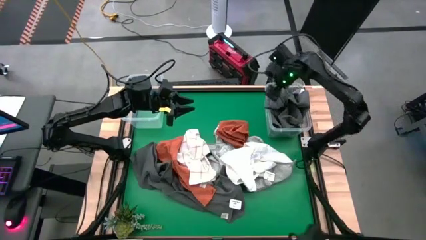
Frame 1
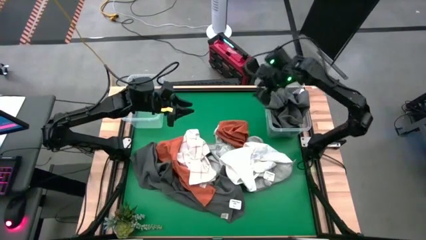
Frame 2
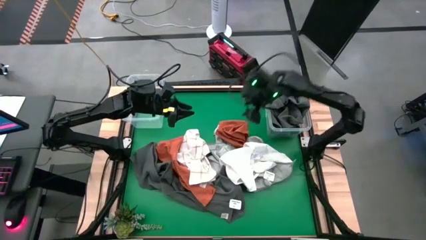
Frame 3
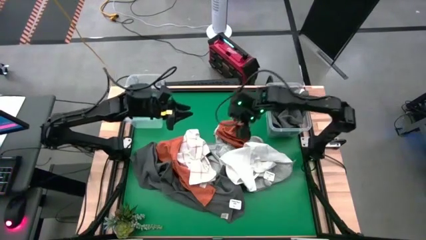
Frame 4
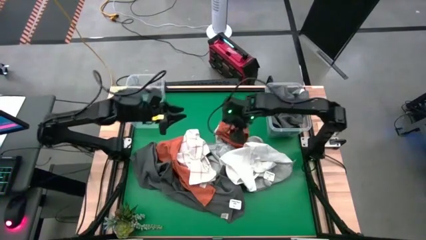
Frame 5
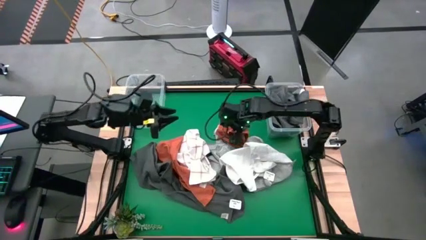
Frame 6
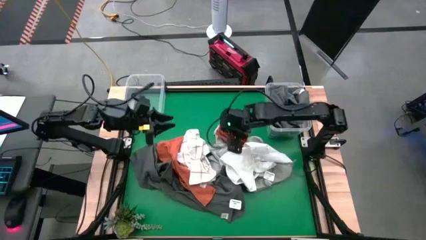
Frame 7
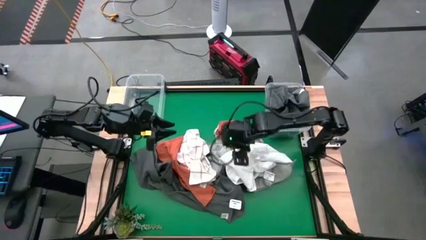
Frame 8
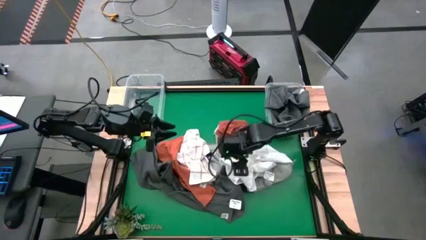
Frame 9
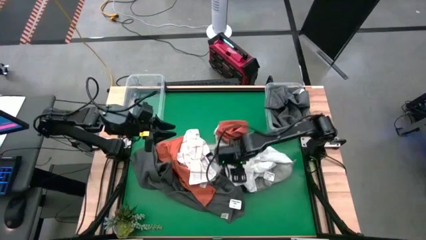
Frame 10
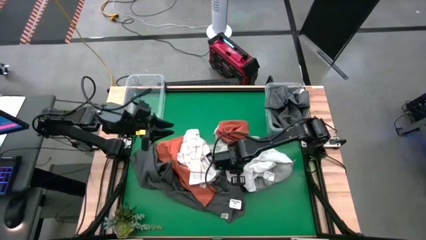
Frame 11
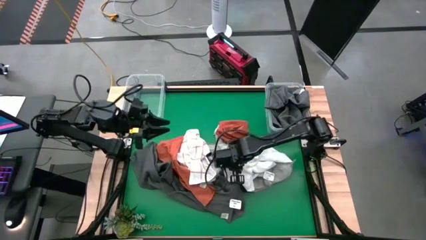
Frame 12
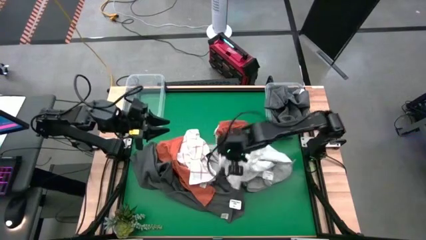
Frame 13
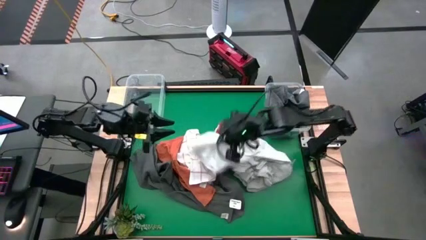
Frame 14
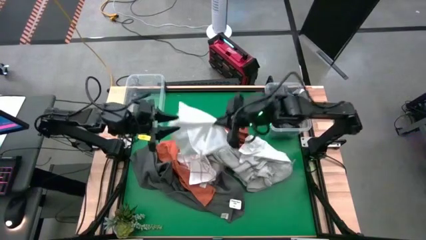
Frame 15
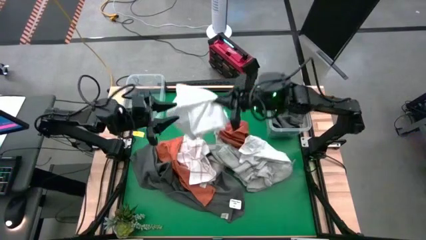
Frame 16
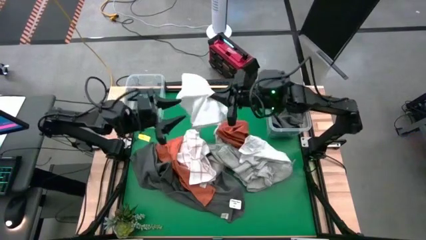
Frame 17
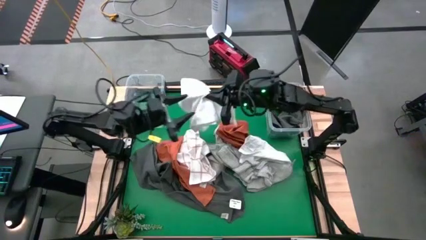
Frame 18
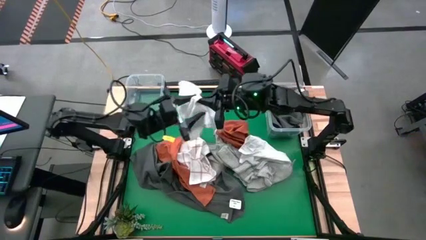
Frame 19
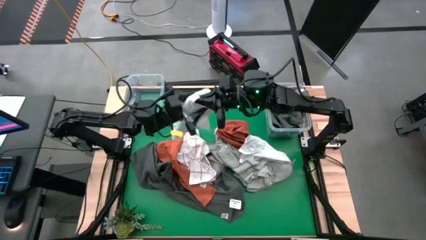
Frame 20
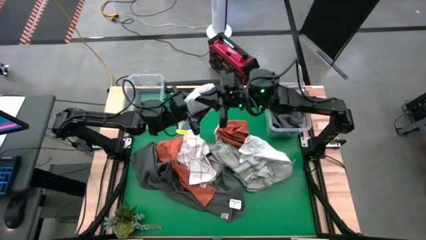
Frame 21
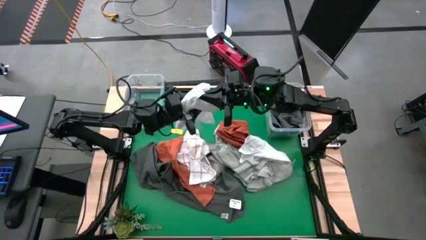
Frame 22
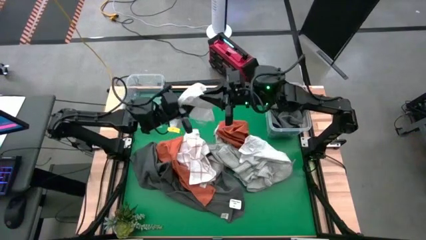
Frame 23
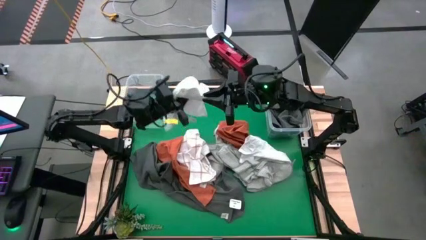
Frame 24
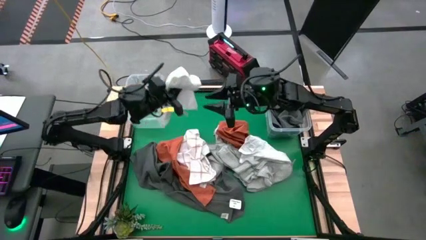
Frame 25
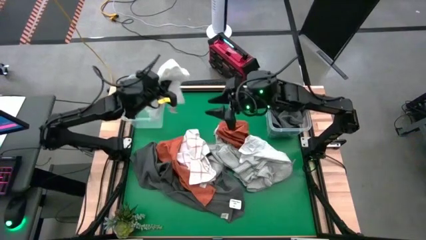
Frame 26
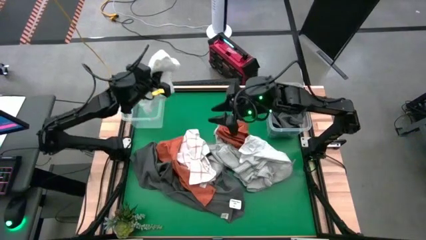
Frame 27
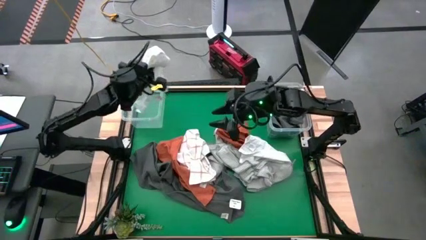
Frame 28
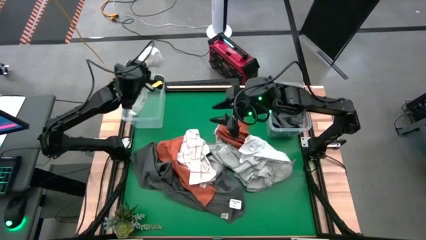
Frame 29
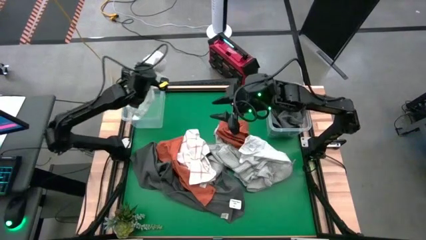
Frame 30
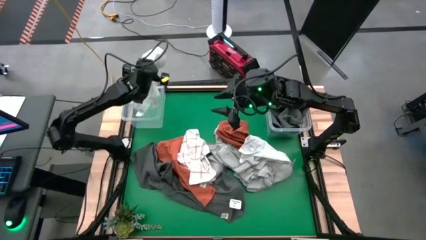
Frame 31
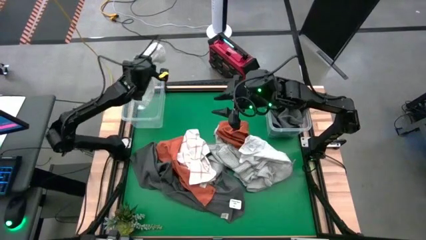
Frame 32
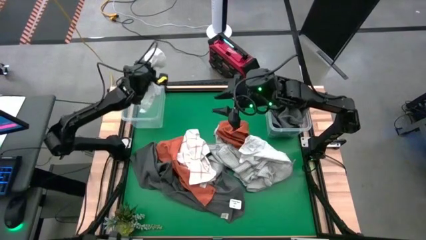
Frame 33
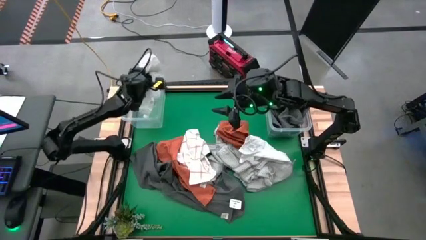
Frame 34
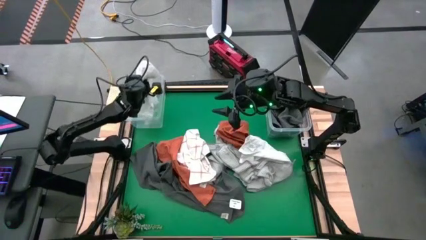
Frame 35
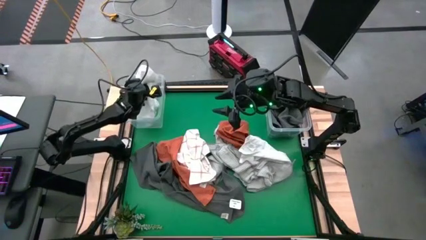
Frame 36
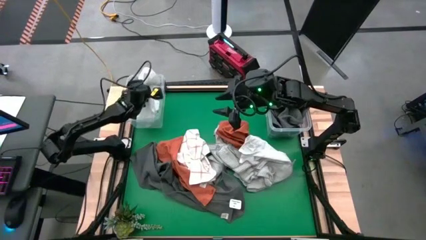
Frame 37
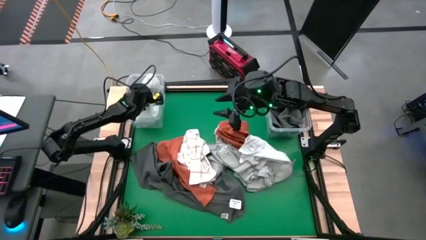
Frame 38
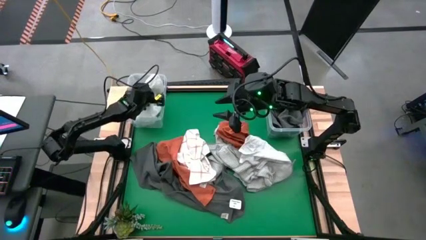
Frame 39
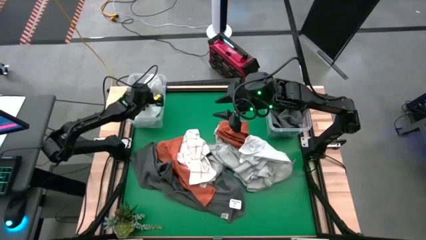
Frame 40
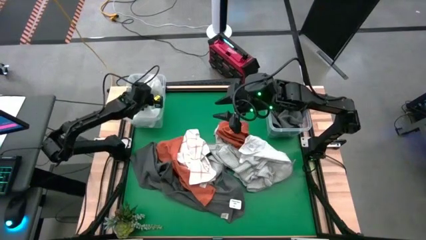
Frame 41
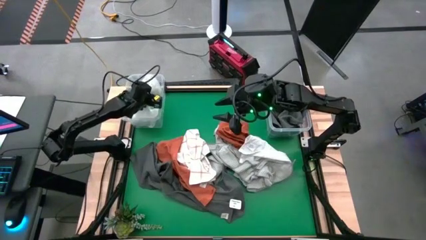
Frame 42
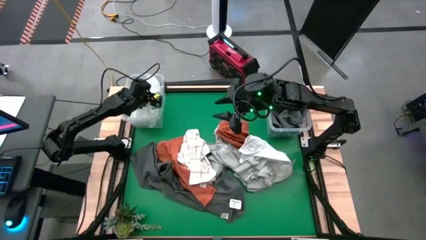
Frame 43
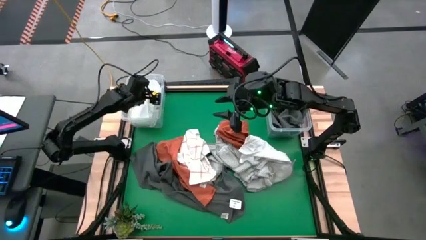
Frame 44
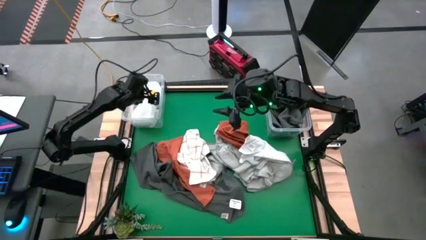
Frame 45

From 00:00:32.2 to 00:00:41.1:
Task: Sort towels by color in basket
Put the white towel into the left transparent bin

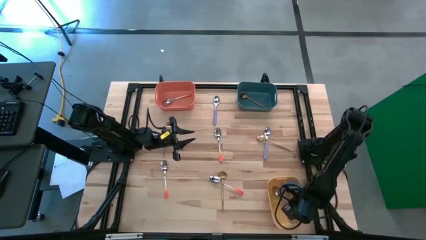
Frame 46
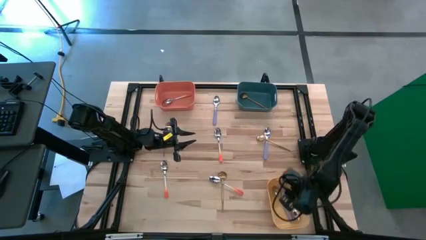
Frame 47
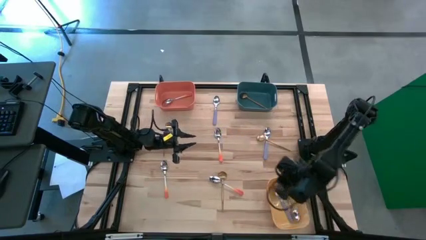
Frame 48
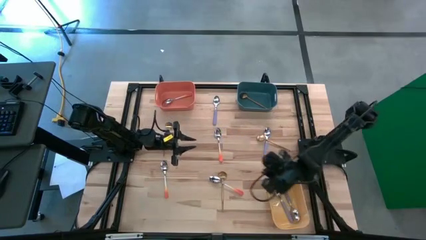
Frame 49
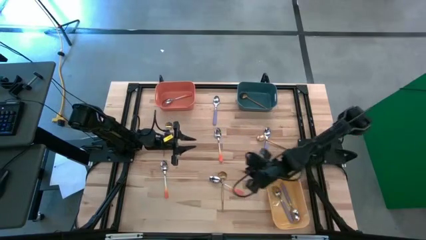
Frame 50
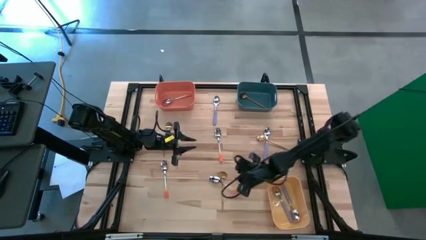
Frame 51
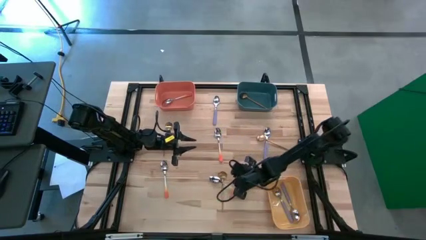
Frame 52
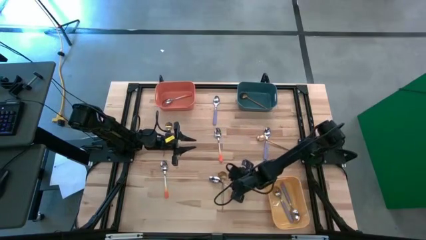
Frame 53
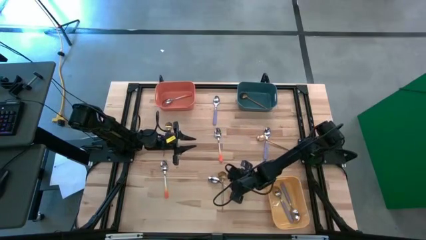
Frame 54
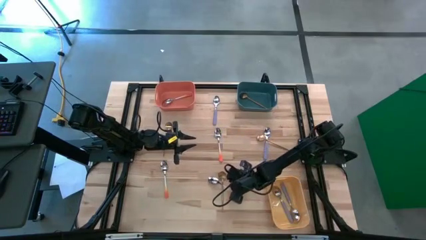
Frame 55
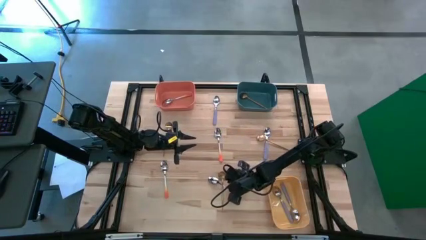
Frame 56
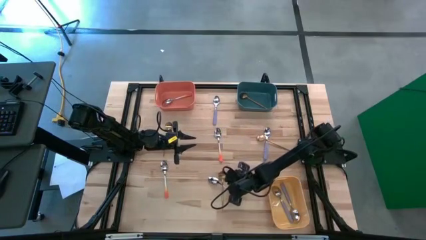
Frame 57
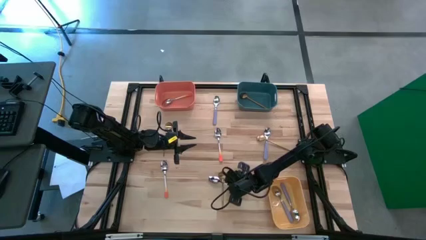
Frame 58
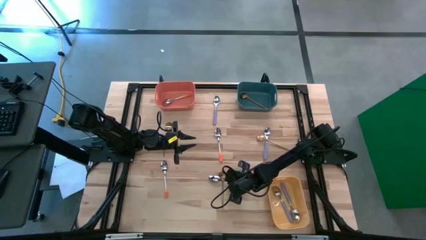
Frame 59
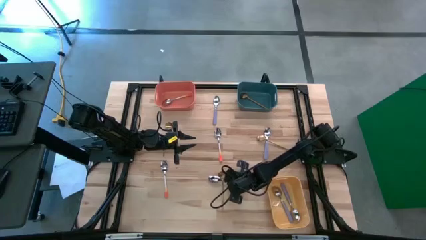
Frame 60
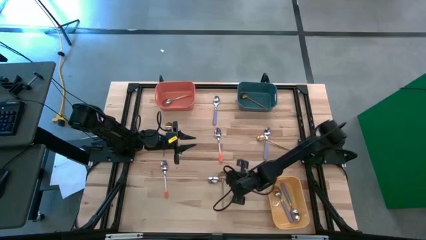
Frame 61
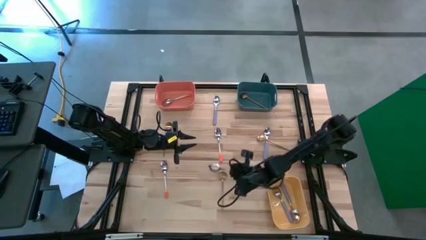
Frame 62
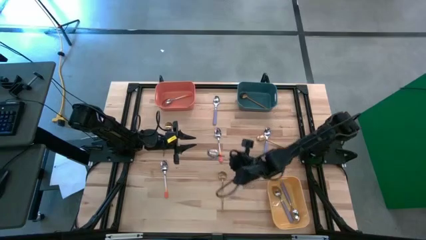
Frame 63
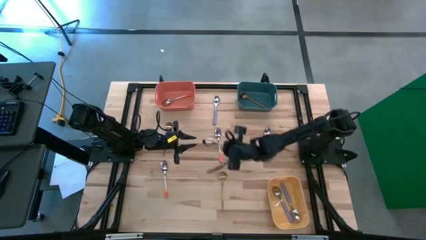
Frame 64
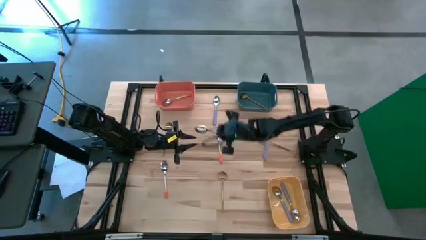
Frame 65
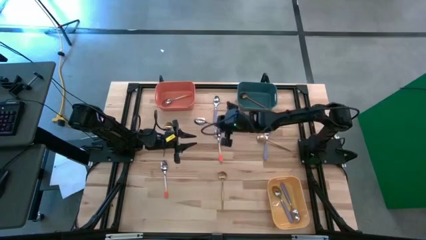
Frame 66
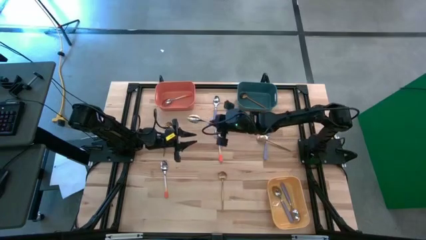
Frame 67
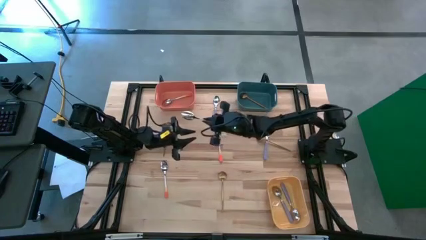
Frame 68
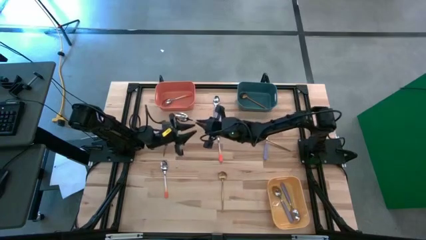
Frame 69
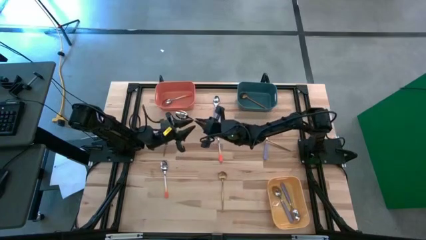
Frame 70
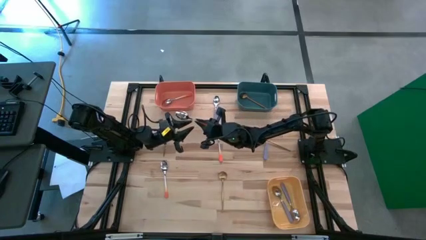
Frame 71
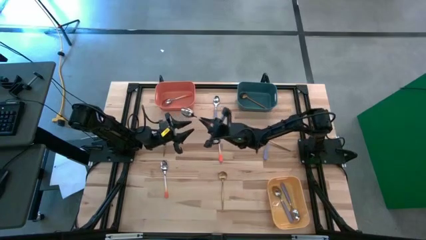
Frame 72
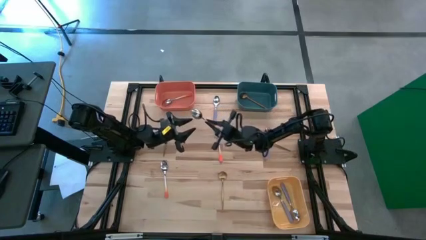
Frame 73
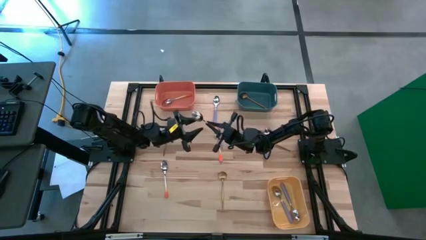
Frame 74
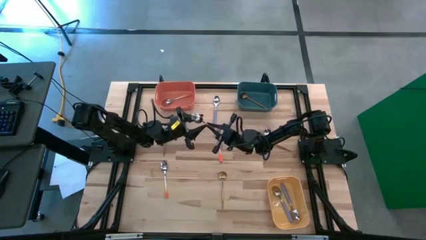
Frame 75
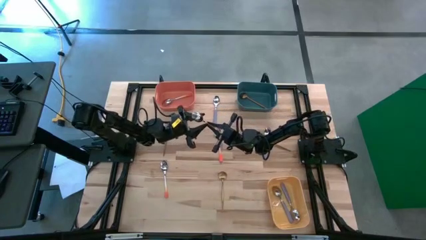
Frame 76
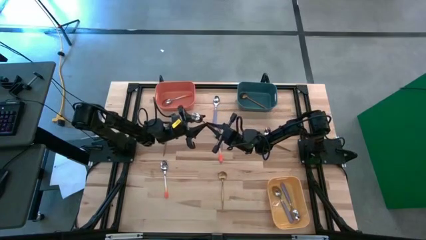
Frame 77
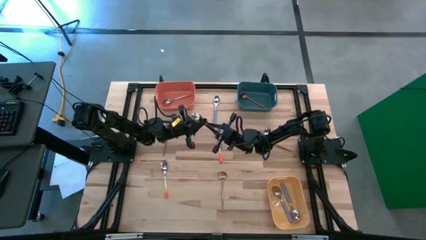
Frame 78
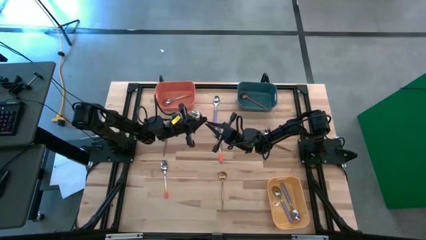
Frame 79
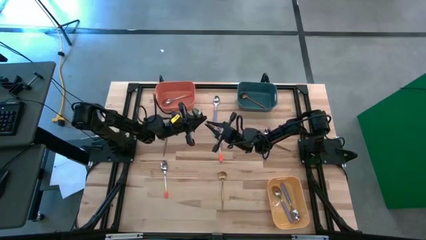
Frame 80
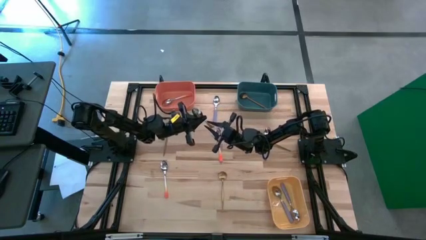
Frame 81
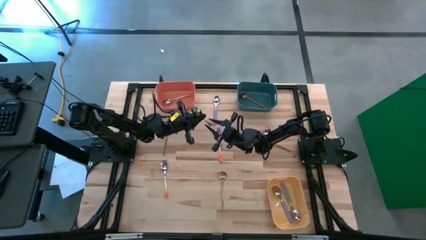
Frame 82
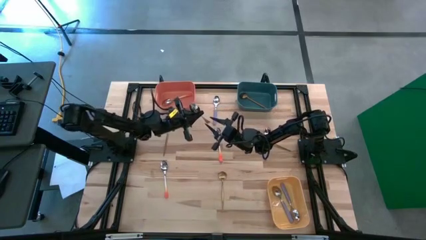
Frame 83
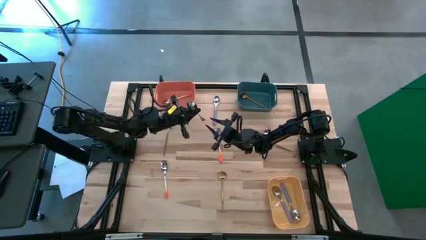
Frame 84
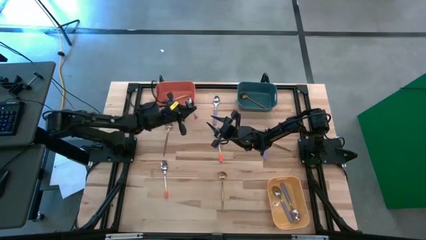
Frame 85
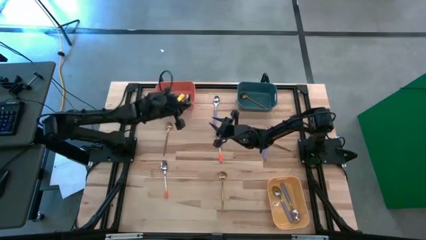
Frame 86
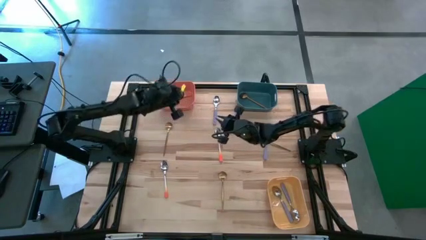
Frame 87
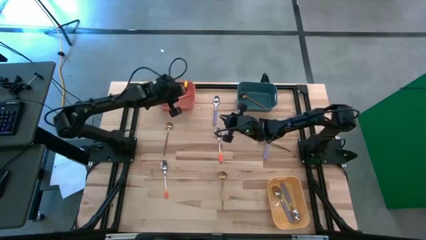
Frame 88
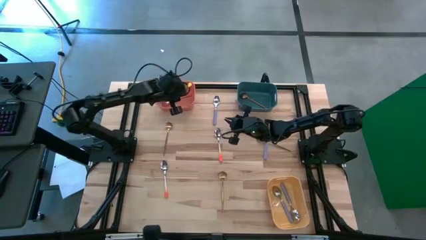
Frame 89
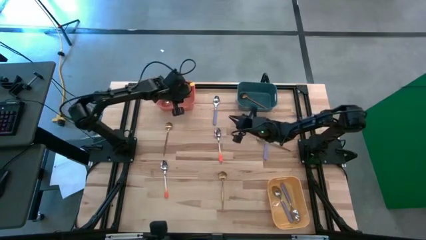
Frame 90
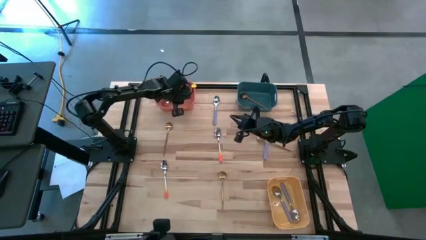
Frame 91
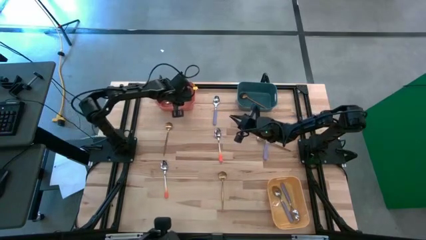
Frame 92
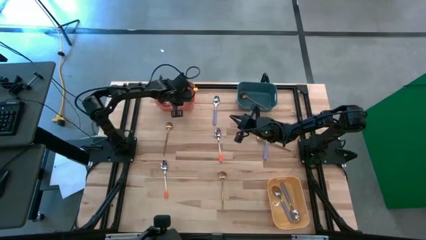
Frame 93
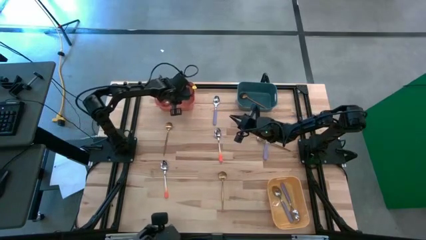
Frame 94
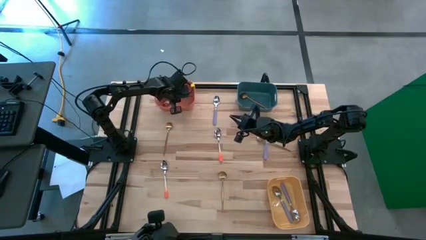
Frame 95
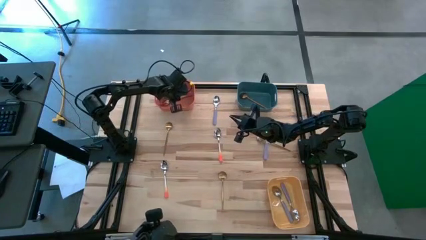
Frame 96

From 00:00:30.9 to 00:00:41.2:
Task: Sort silverware by color (type)
Put the orange spoon into the orange bin
